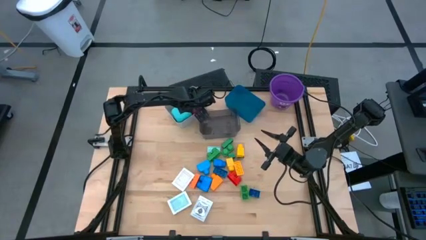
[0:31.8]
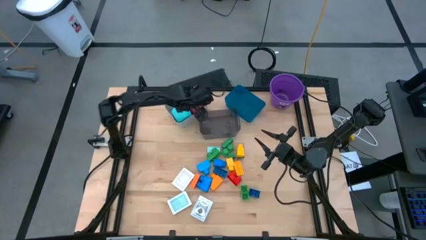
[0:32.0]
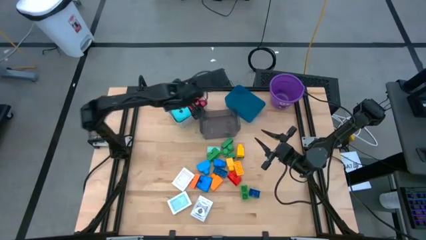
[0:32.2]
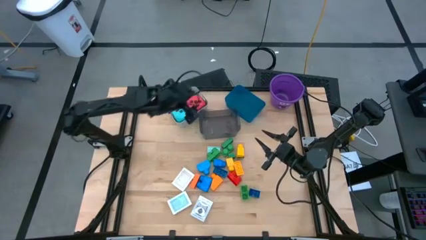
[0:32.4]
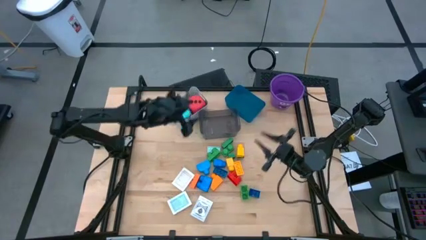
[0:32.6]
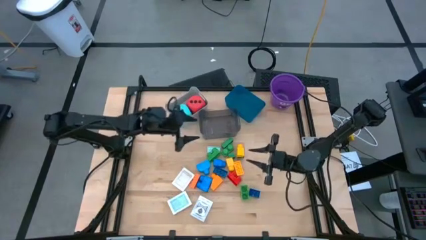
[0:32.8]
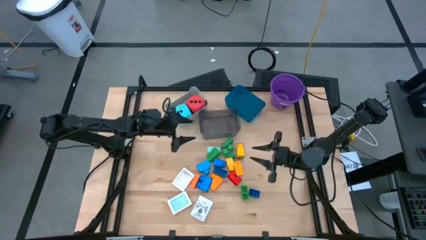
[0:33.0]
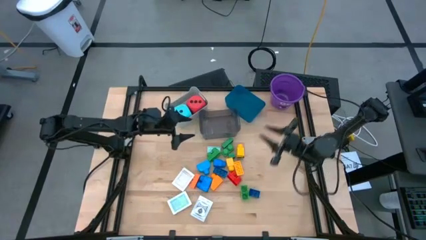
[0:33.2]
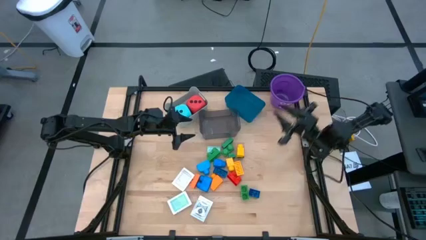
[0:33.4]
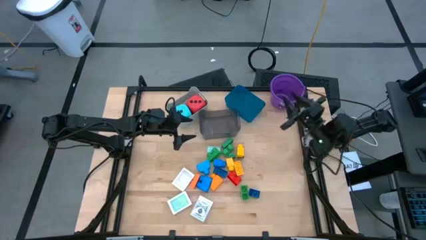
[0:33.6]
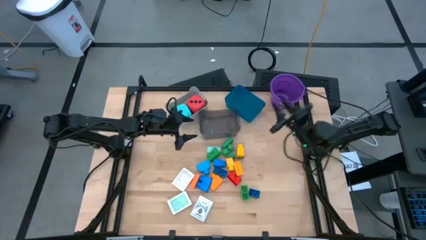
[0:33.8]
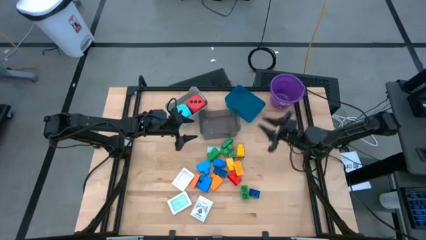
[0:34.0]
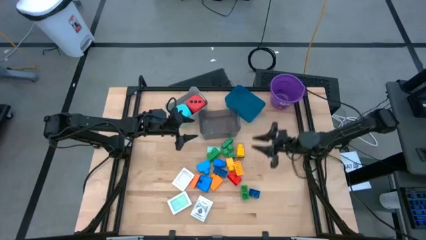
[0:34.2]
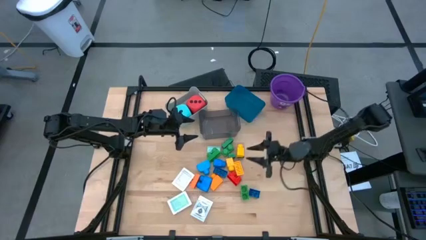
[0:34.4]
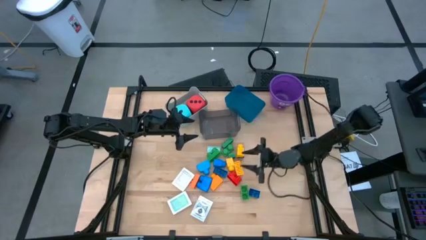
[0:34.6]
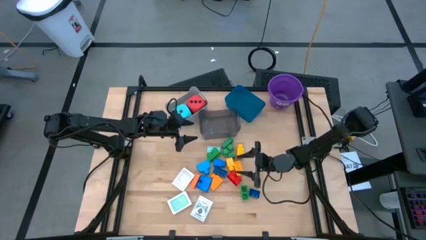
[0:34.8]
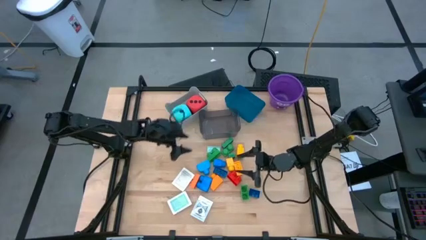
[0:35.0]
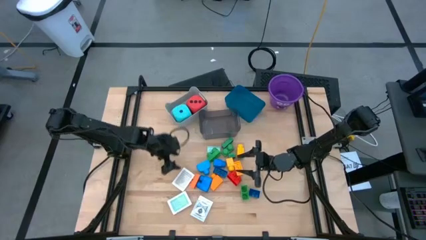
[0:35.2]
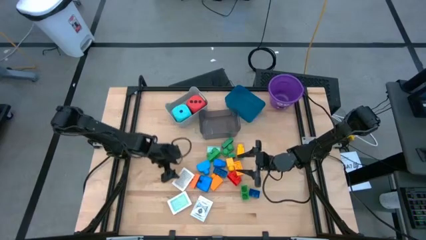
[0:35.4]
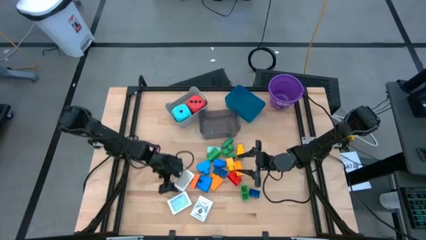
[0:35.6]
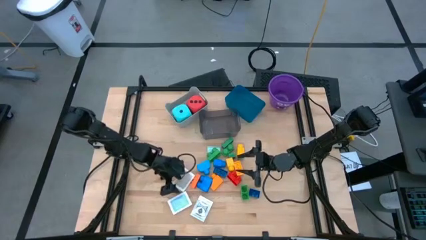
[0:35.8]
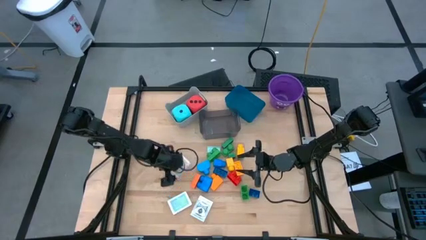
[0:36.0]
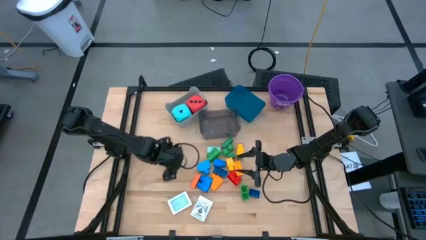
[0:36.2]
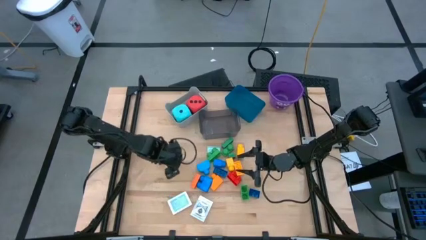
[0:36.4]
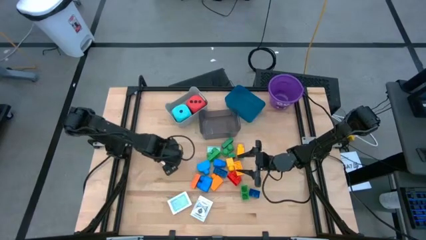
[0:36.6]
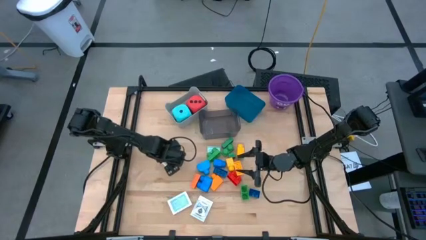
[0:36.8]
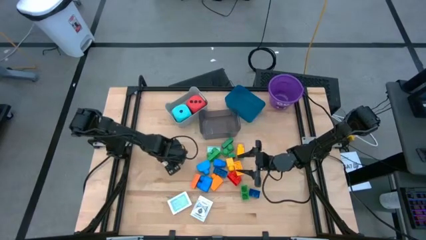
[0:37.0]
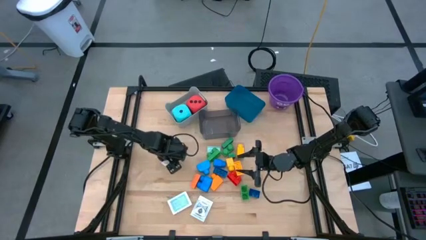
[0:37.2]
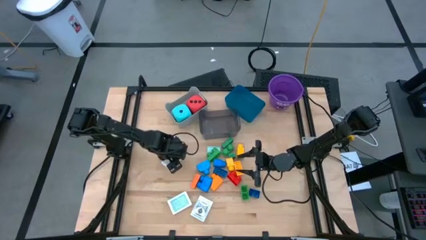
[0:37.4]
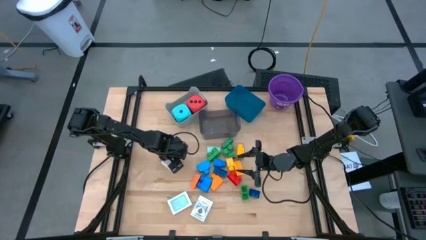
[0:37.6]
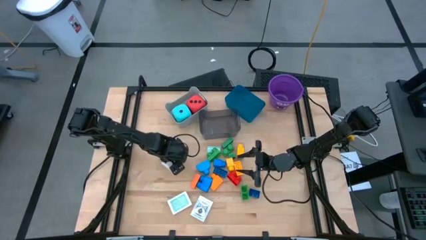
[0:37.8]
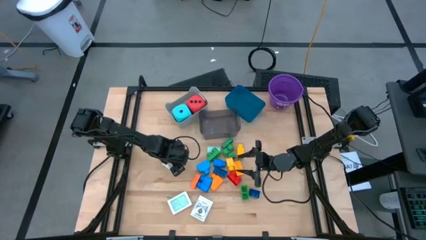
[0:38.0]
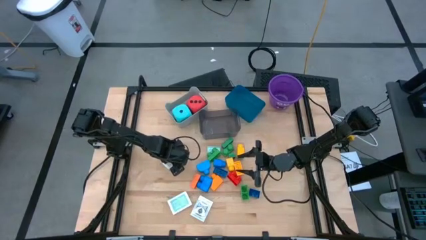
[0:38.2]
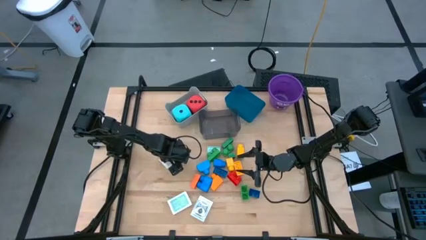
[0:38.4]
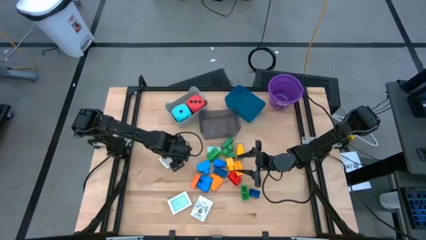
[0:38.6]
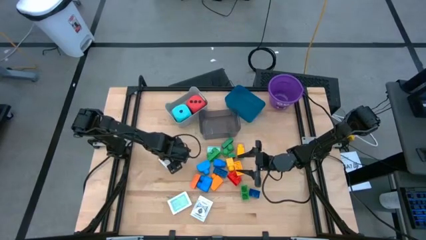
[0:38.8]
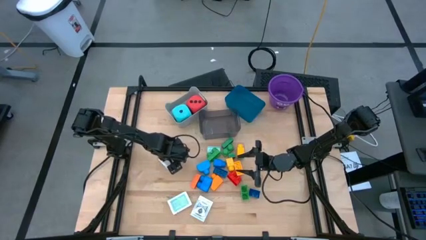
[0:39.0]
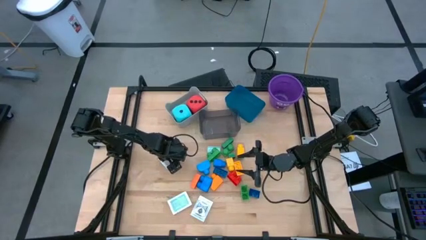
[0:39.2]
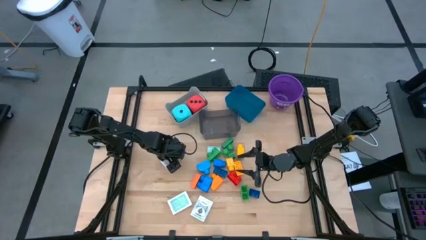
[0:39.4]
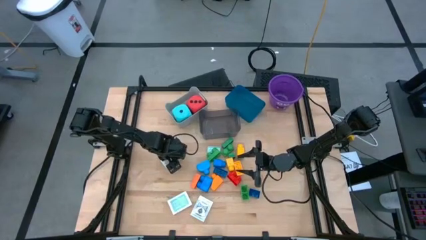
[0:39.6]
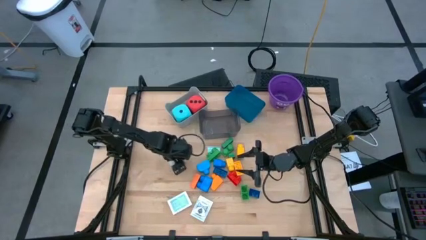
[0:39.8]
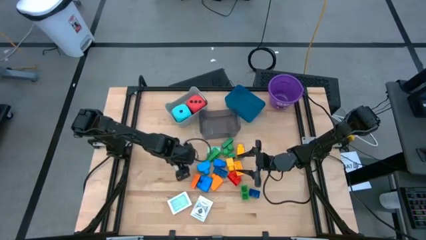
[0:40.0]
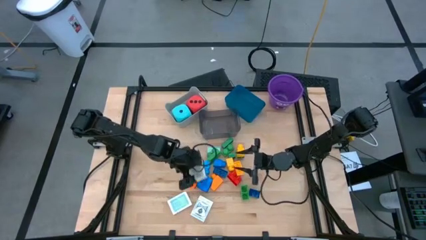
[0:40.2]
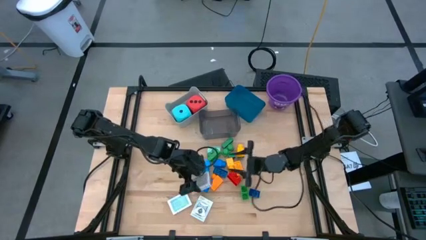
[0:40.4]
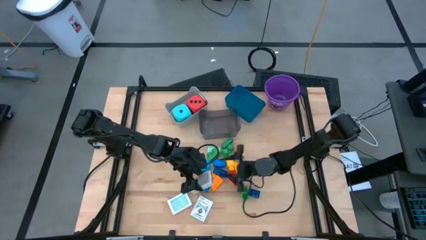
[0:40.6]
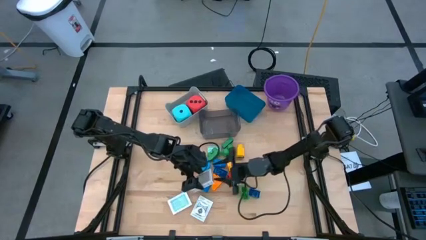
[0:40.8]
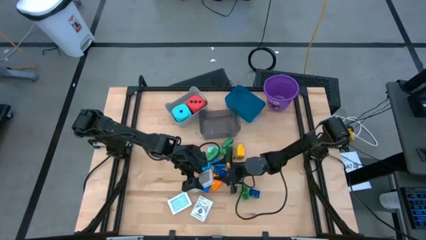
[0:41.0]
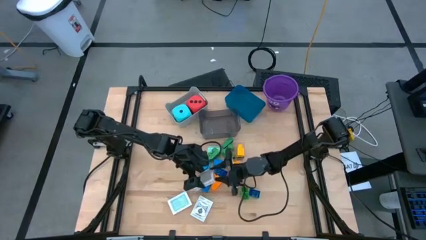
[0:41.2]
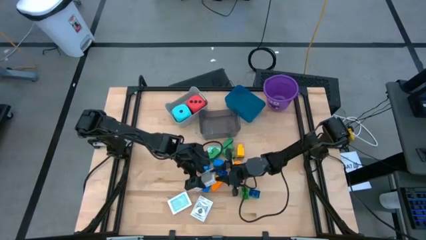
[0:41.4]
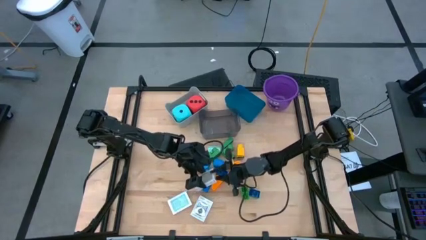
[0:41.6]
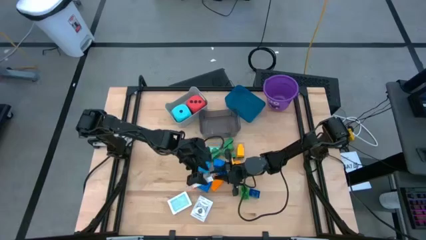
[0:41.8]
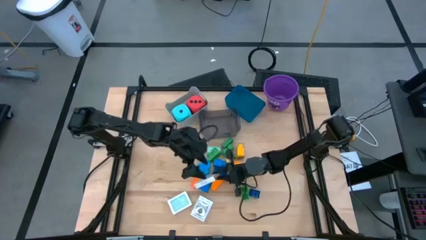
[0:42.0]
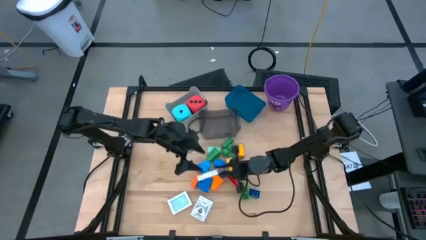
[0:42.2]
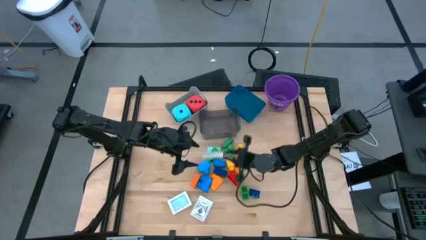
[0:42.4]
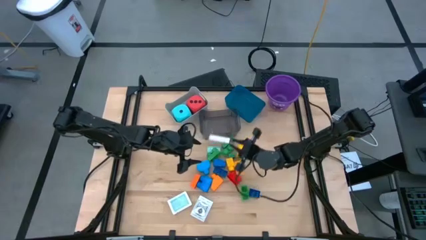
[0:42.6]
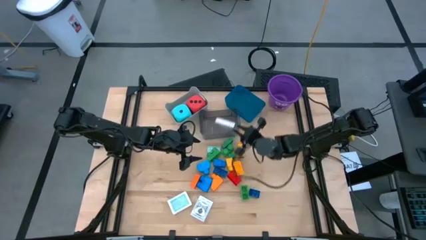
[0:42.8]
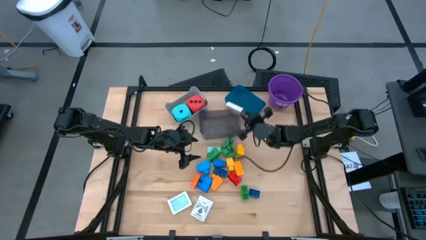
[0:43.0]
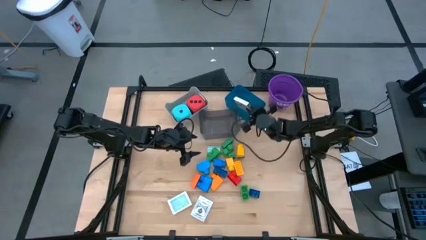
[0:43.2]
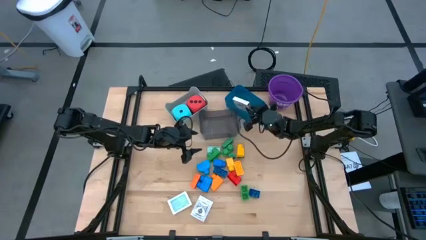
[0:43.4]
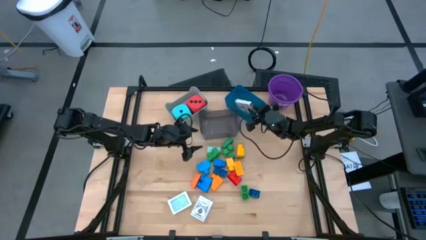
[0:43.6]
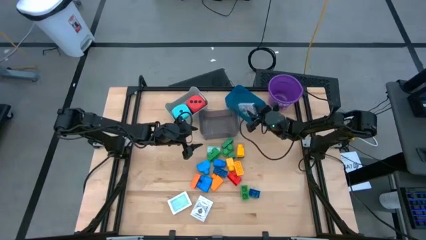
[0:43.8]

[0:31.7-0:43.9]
Task: Pick & Place Toys
Put the brown playing card box into the blue bin

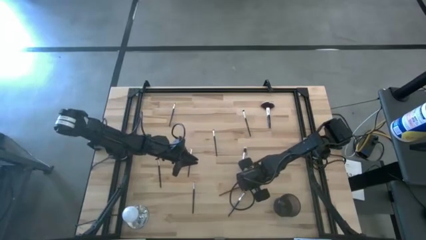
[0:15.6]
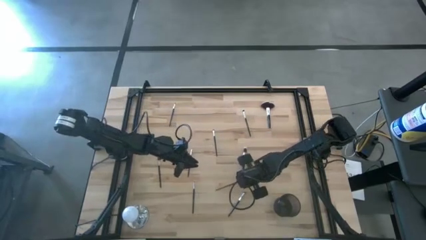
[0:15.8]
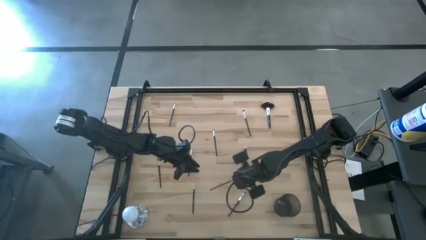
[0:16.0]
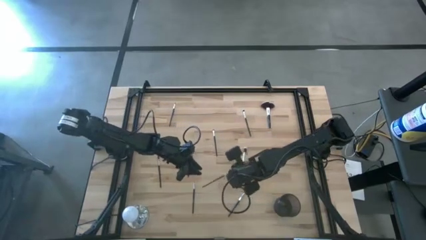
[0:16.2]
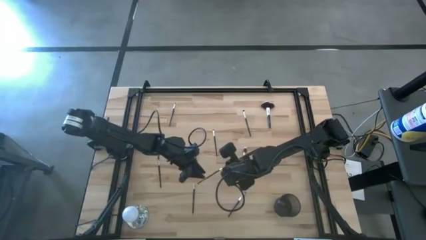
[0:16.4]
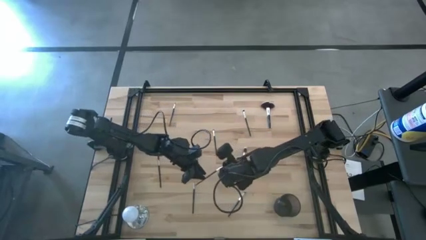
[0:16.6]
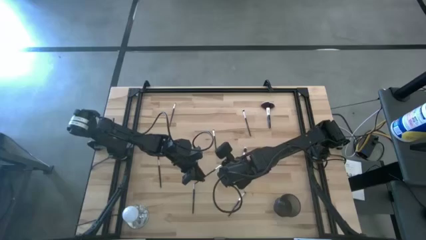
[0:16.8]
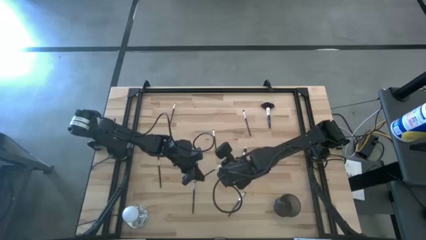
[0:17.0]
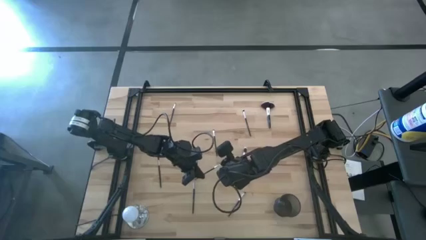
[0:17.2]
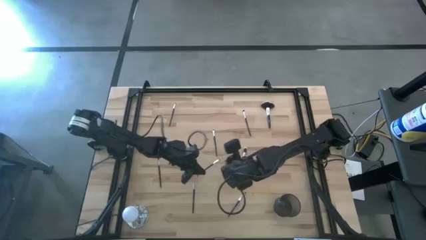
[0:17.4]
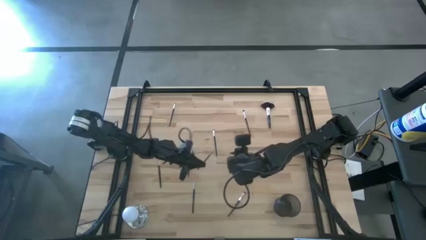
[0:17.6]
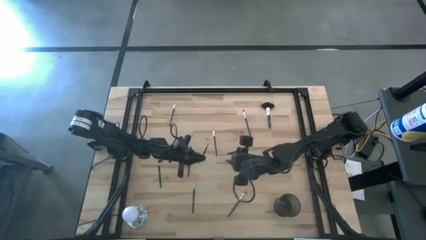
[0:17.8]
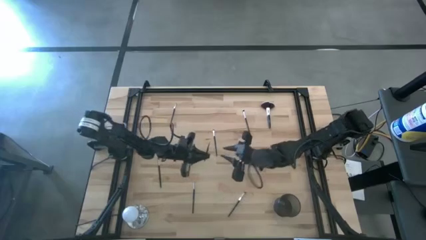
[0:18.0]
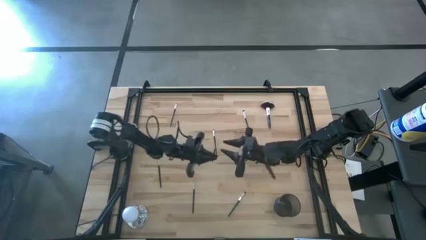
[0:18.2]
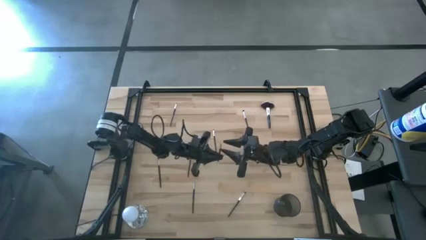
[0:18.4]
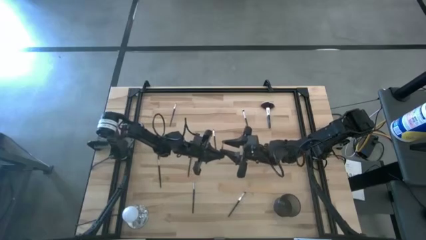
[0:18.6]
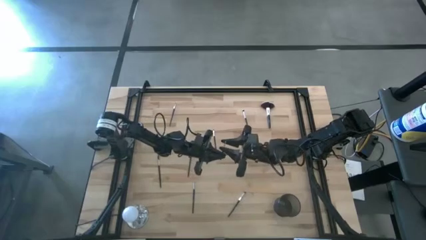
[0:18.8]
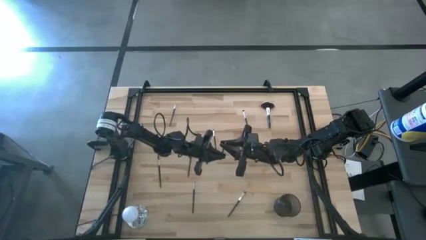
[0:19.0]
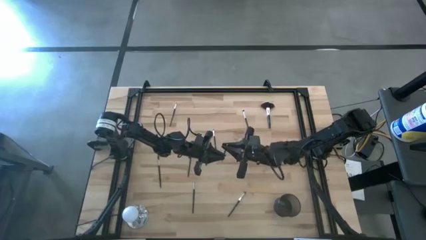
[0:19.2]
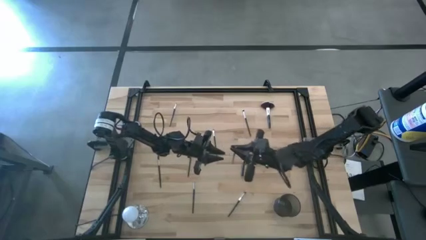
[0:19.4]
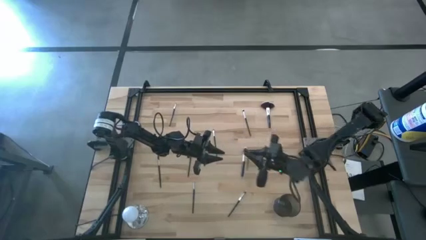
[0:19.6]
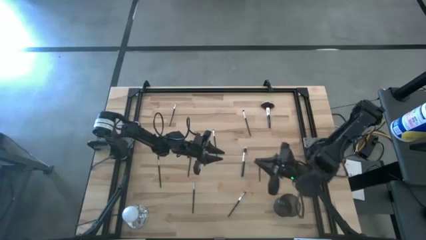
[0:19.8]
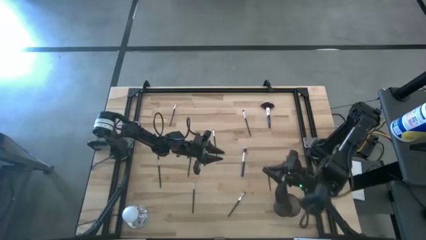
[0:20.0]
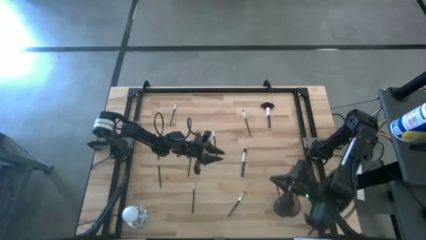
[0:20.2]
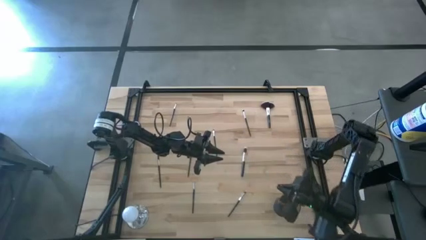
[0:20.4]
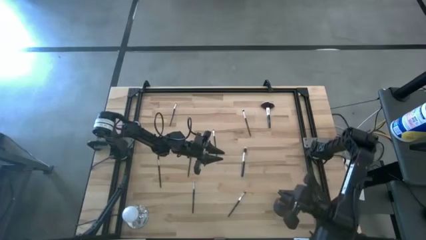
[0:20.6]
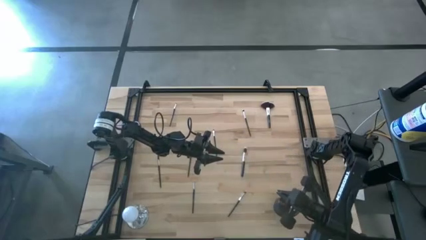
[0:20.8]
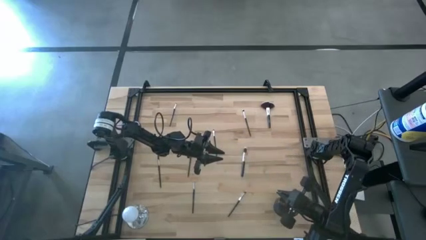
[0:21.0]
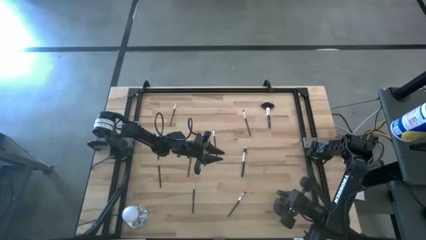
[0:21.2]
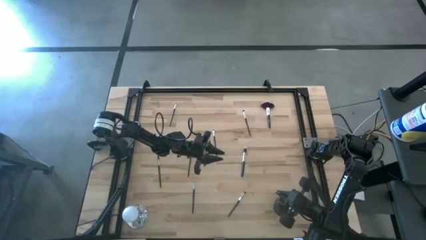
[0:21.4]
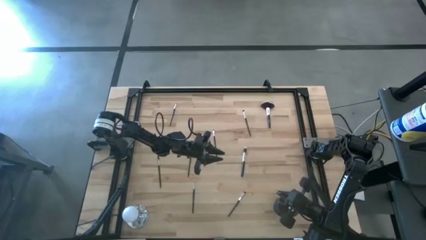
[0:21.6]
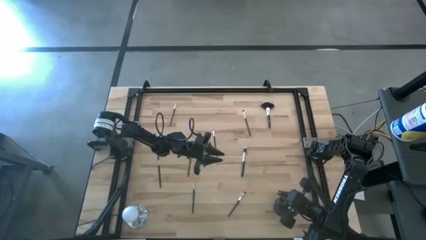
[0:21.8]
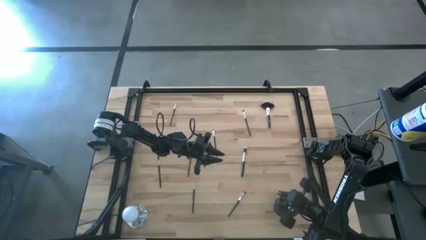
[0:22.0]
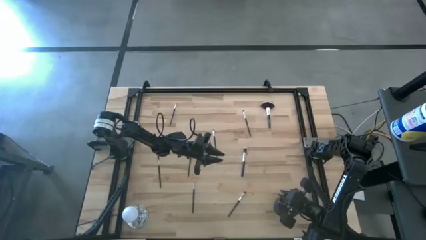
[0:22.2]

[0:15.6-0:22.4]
Task: Sort items
Put the eyeshadow brush into the wire basket
